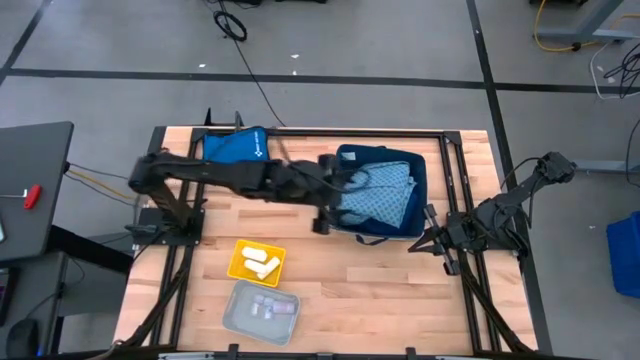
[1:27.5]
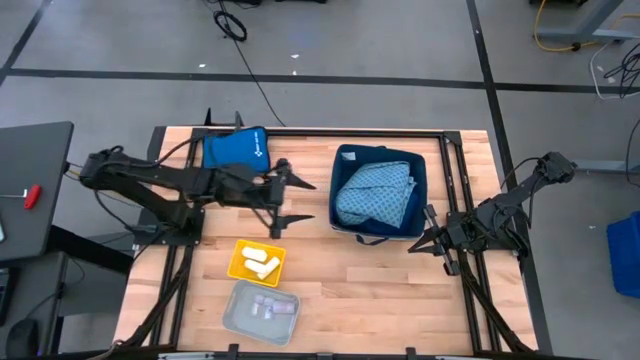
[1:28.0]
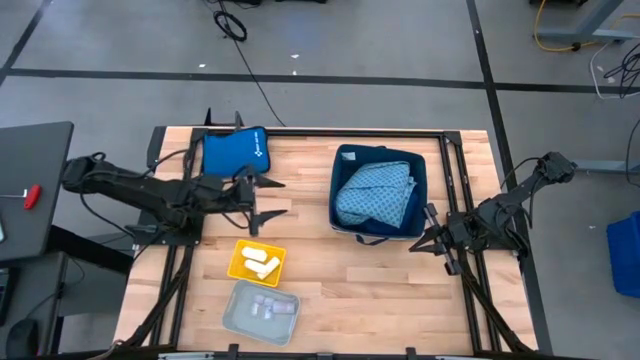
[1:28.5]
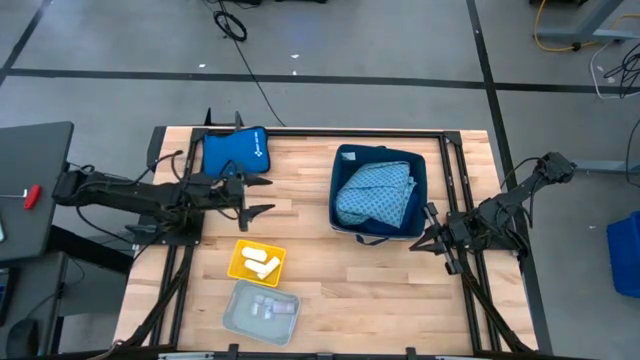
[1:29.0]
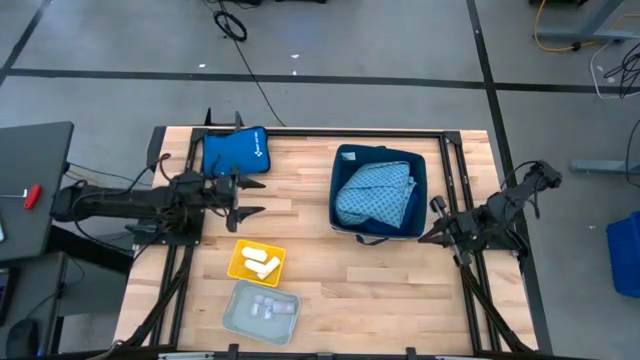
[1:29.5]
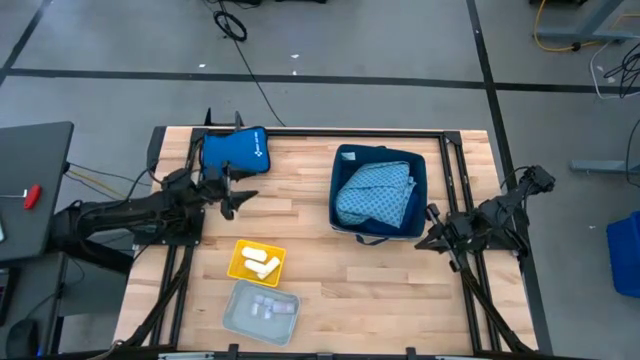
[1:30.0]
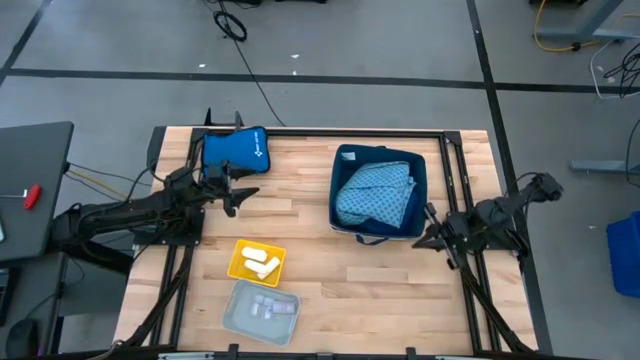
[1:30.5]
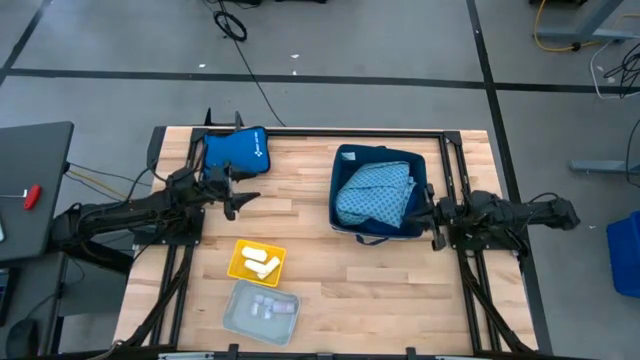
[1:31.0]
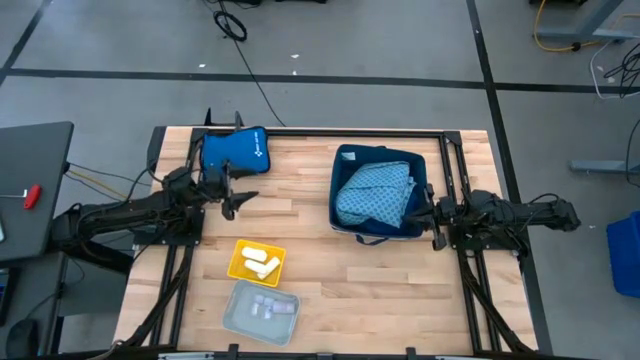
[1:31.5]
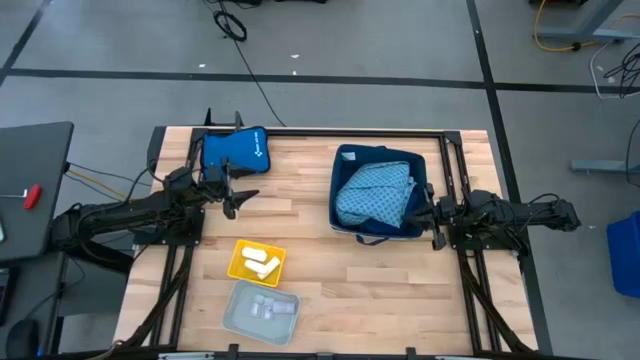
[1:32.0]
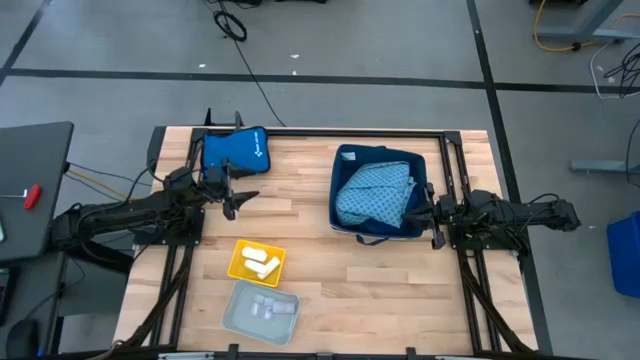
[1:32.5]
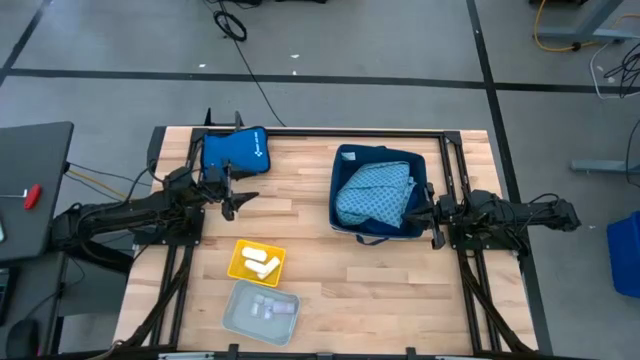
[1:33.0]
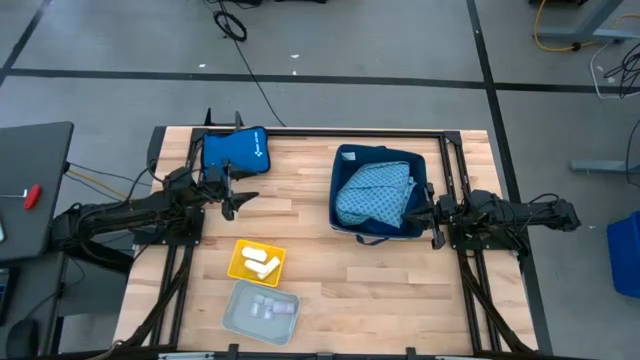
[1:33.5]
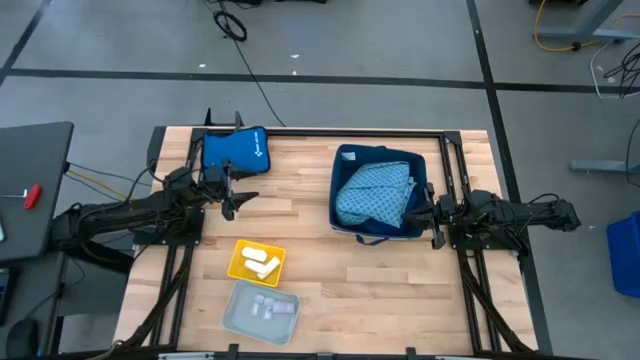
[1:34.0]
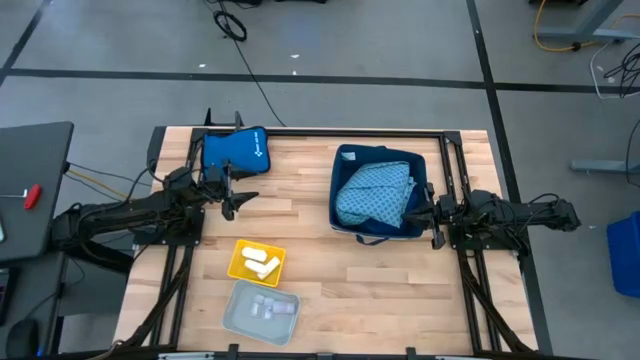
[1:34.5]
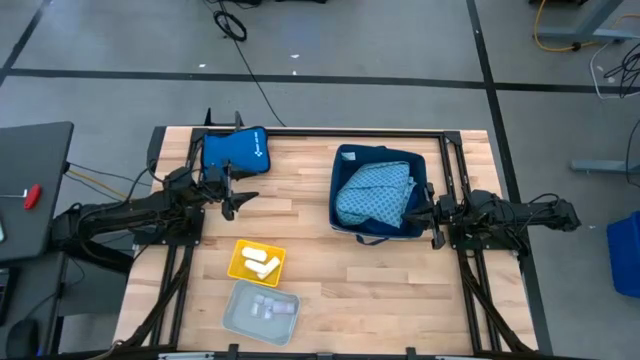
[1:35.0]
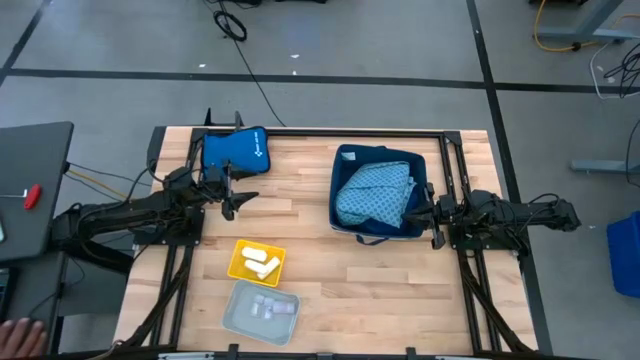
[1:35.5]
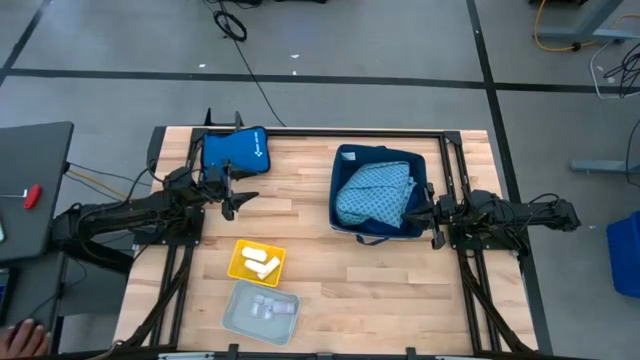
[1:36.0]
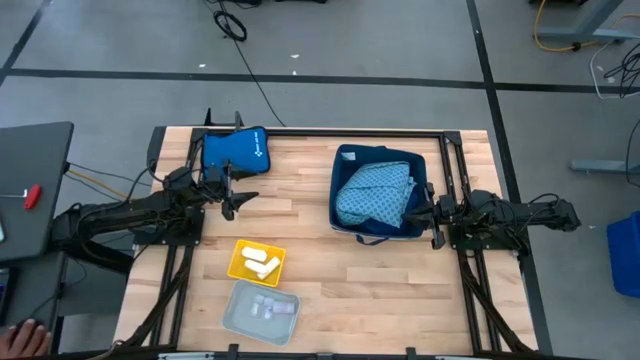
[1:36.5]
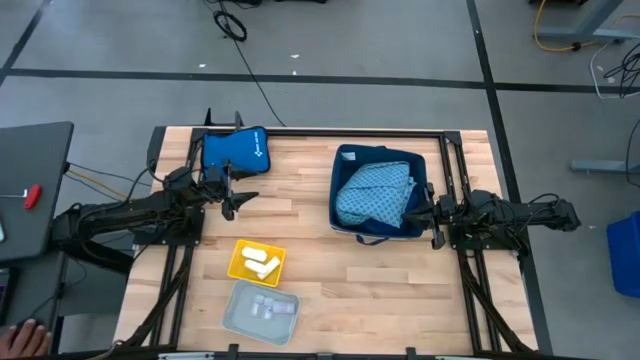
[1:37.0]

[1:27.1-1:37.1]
Task: Pick & place medical supplies in basket/bin
Return to Home Position

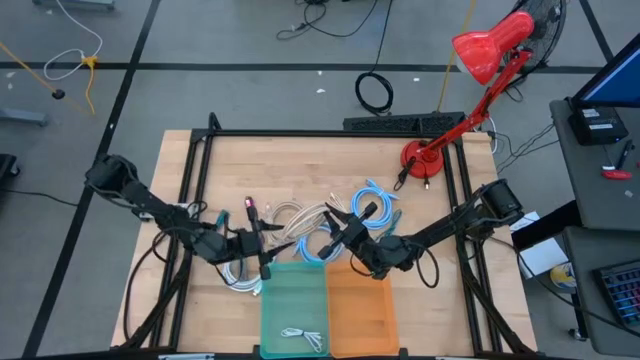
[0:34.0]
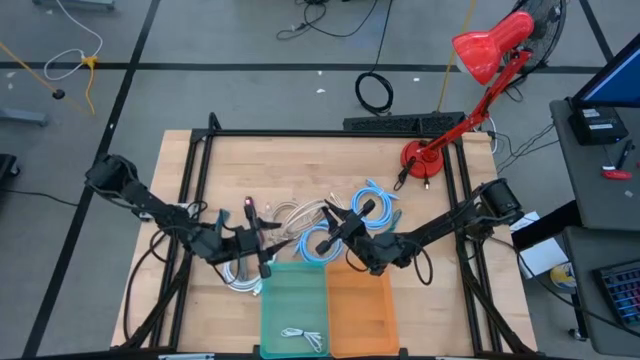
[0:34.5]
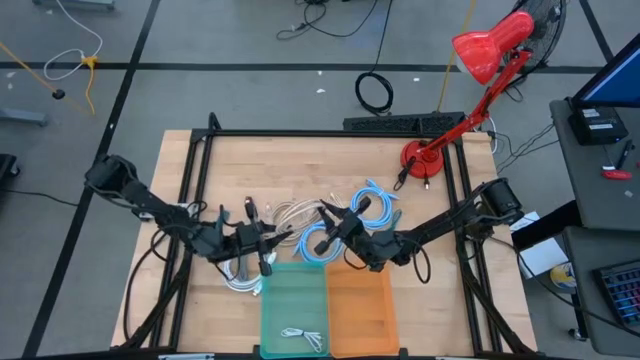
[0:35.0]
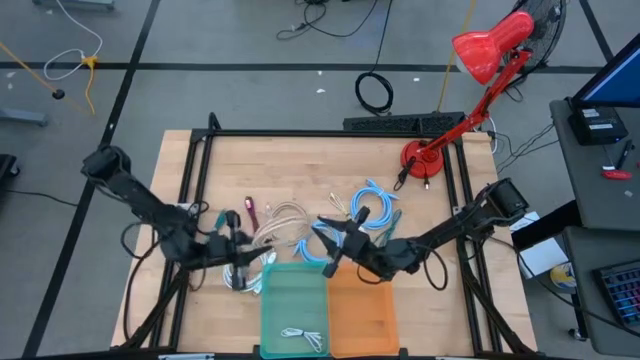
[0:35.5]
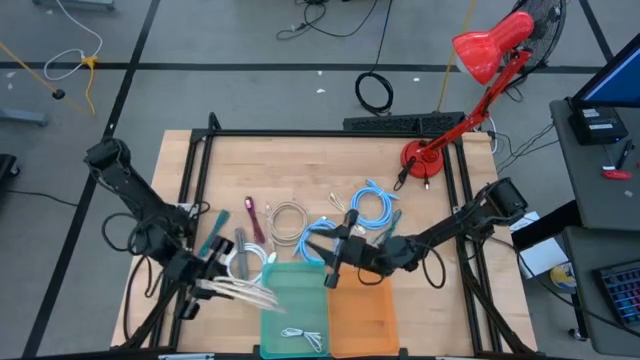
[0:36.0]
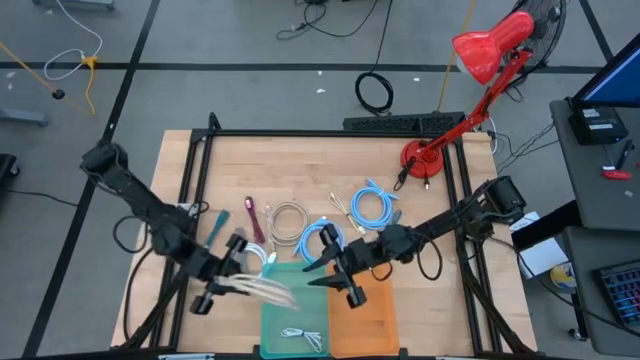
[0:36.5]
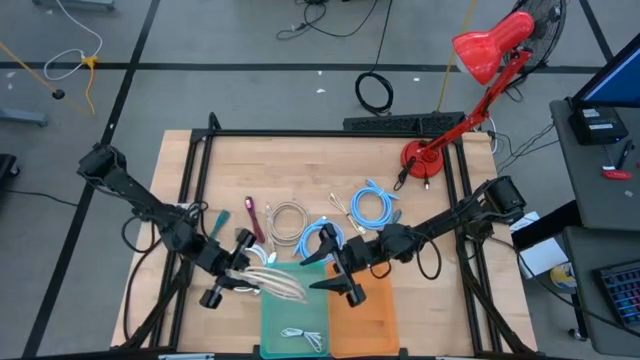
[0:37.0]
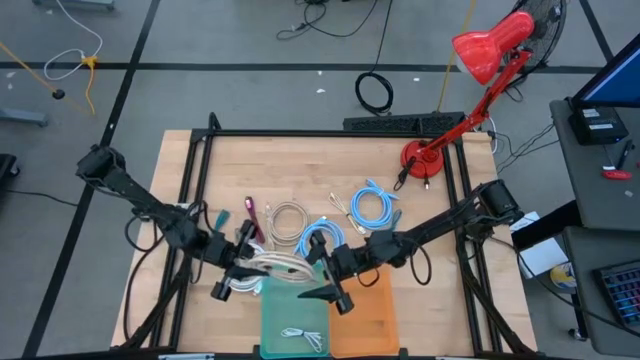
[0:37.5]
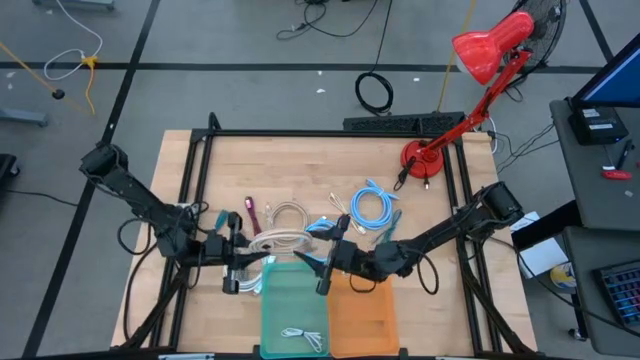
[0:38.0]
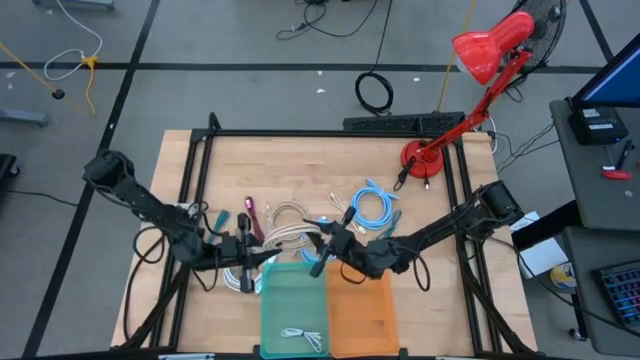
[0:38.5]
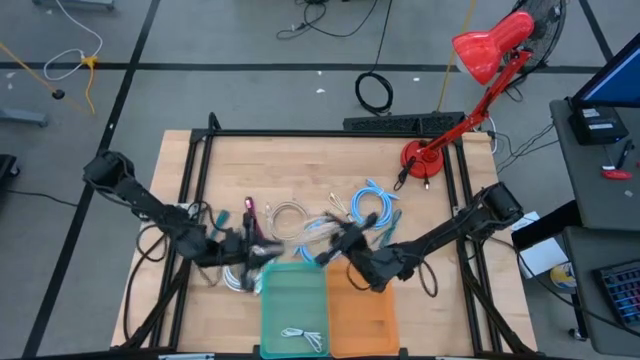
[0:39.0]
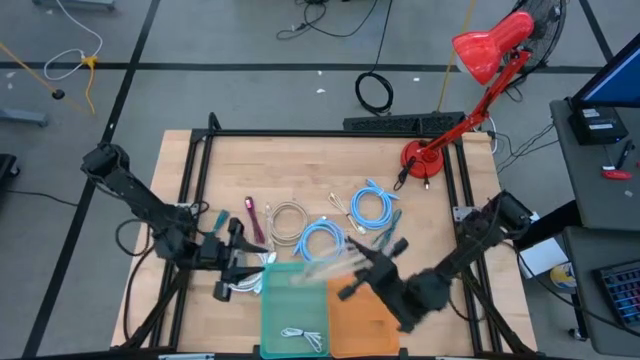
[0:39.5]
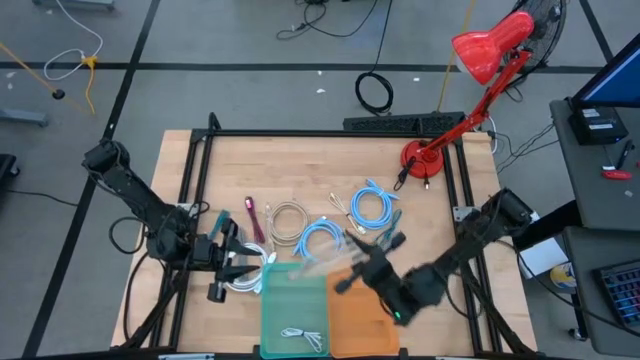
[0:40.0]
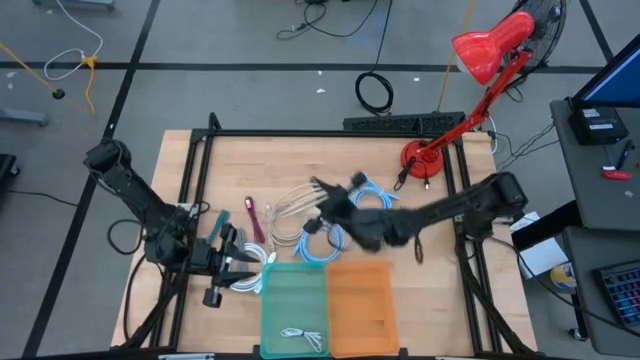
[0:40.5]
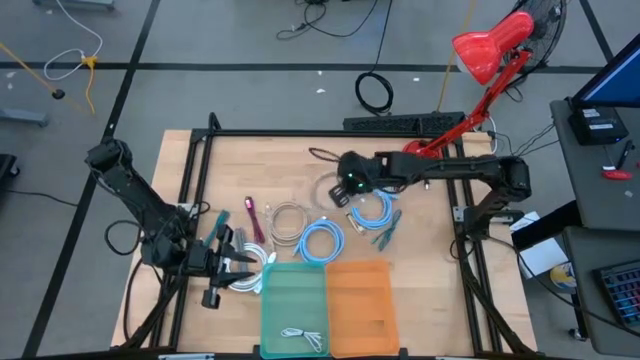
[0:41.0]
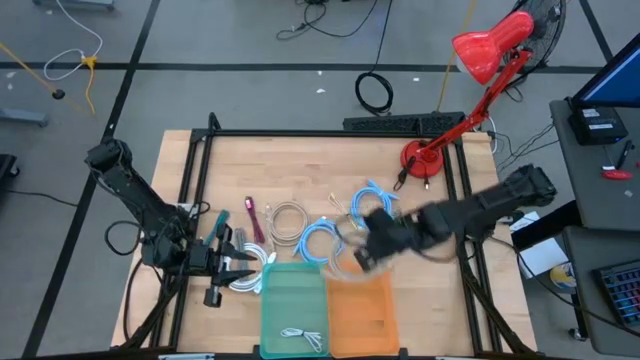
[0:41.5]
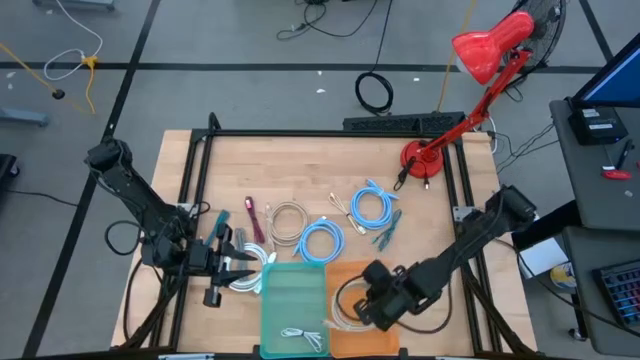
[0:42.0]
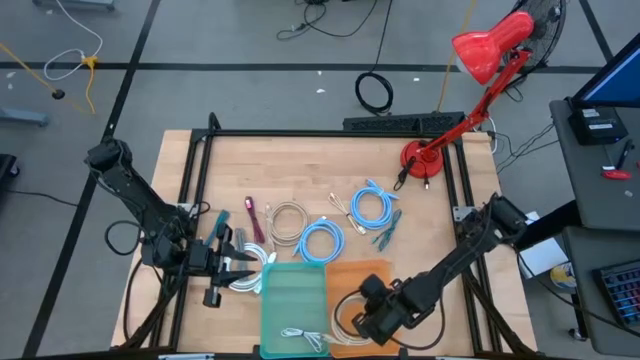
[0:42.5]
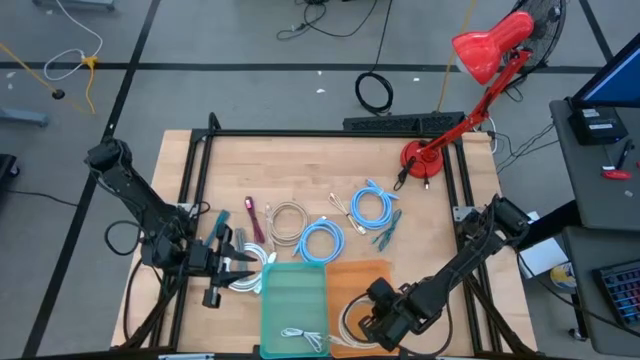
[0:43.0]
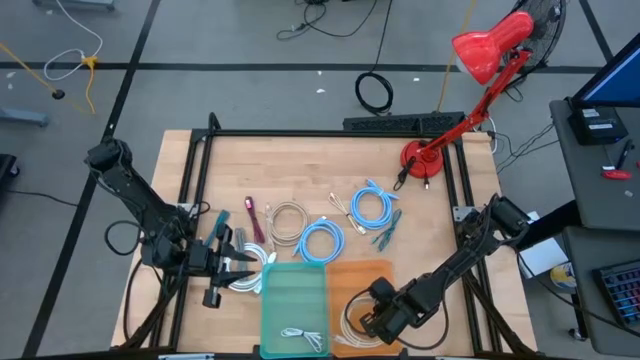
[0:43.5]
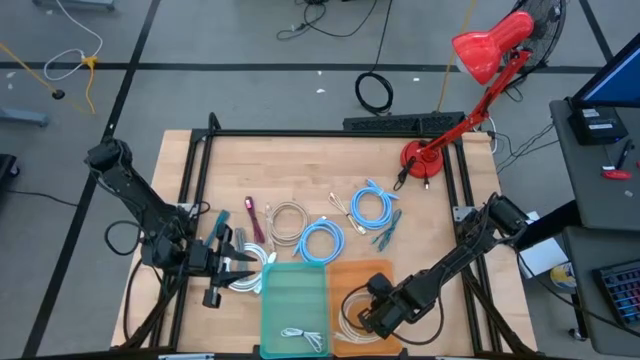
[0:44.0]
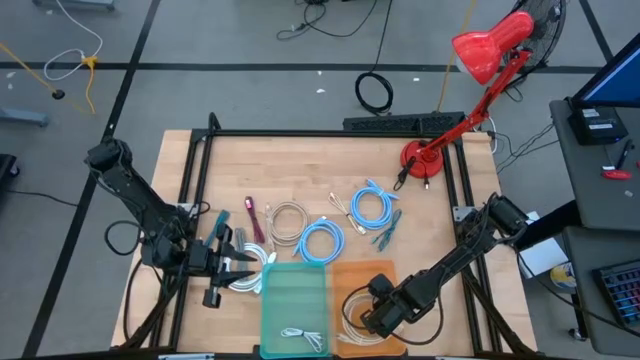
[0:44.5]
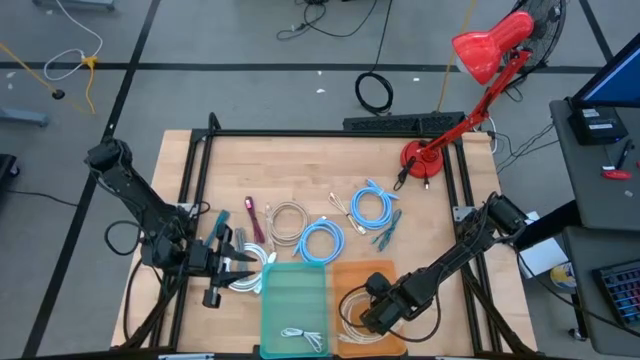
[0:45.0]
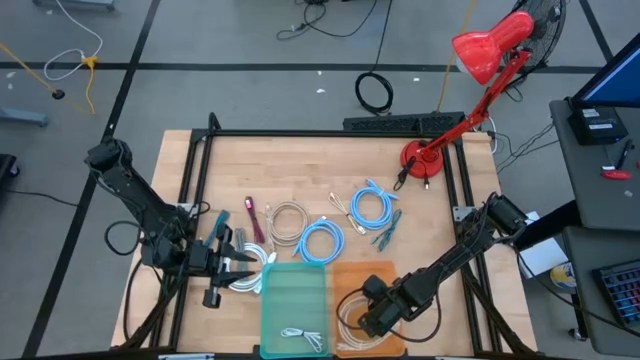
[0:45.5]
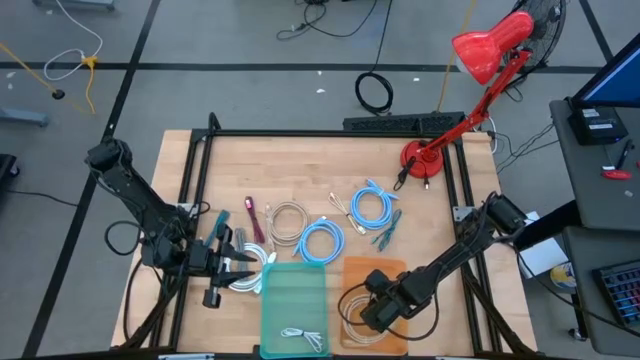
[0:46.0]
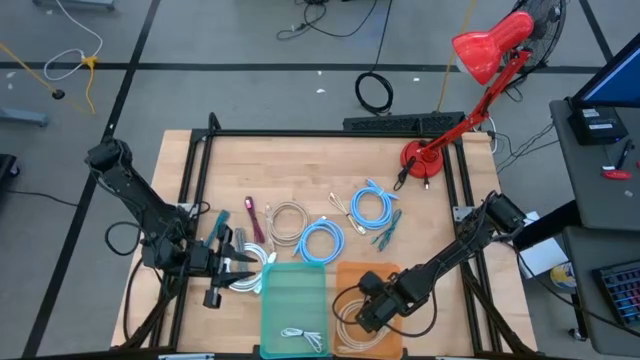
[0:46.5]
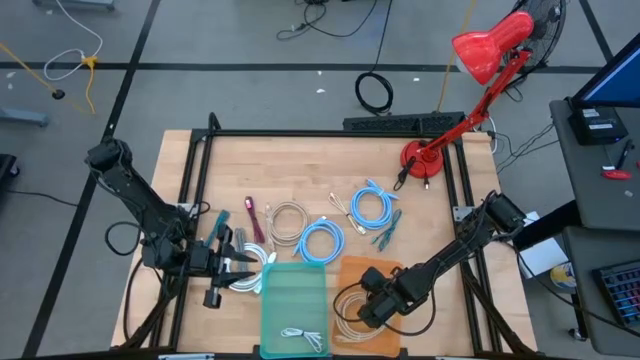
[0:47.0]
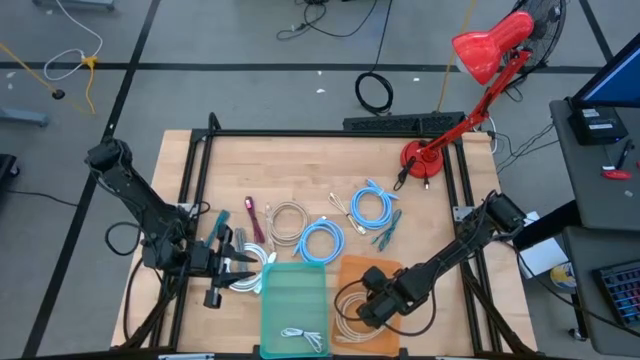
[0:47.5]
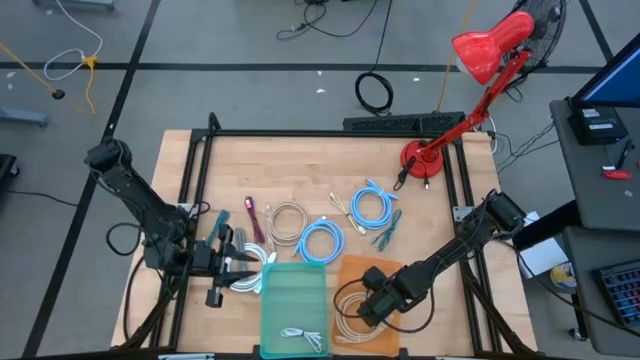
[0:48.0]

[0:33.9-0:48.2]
Task: Pick & Place USB Port
Put the right gray video cable into the orange bin
